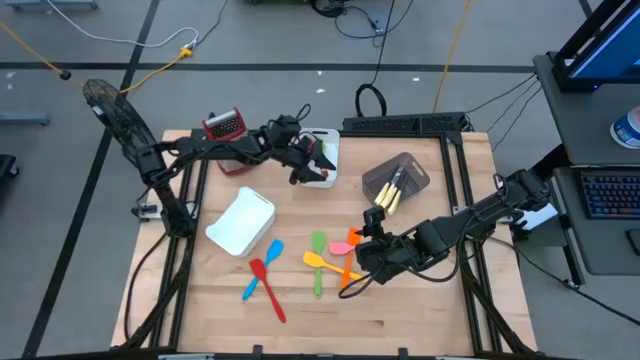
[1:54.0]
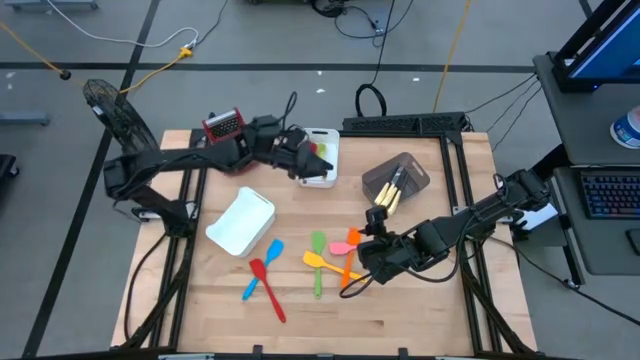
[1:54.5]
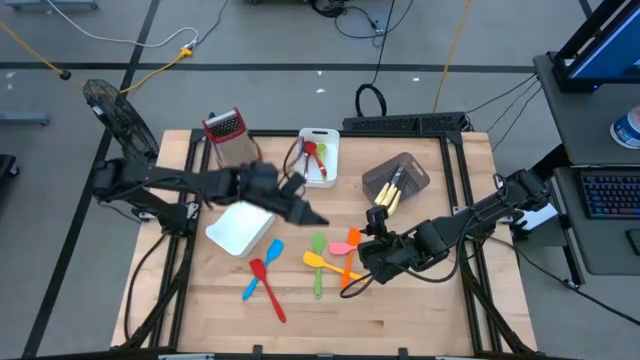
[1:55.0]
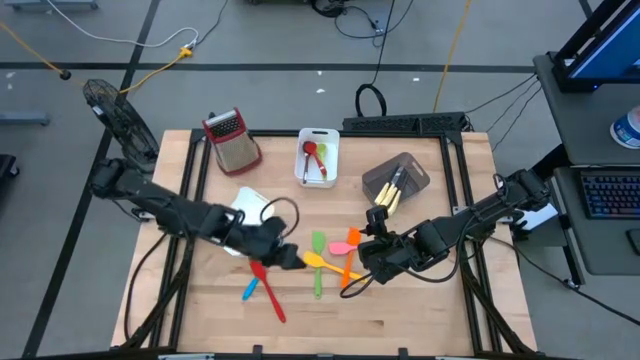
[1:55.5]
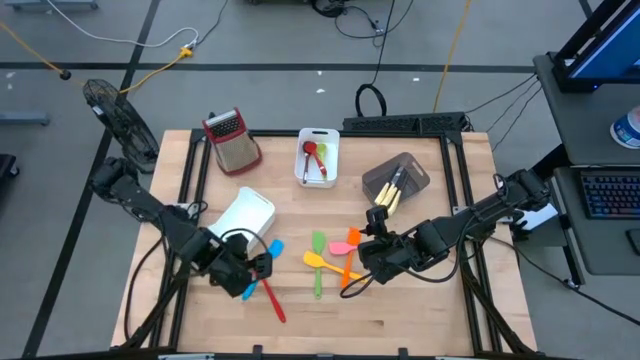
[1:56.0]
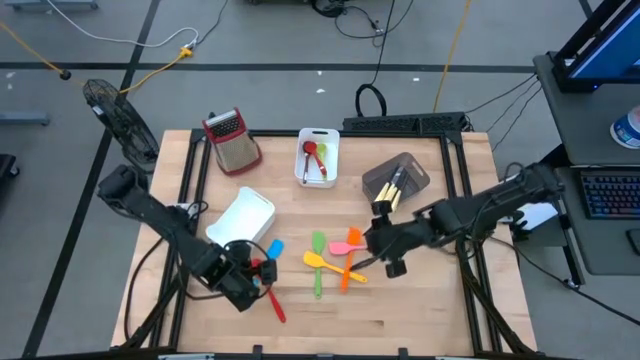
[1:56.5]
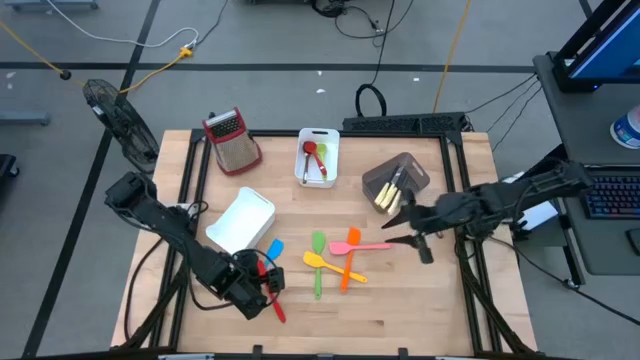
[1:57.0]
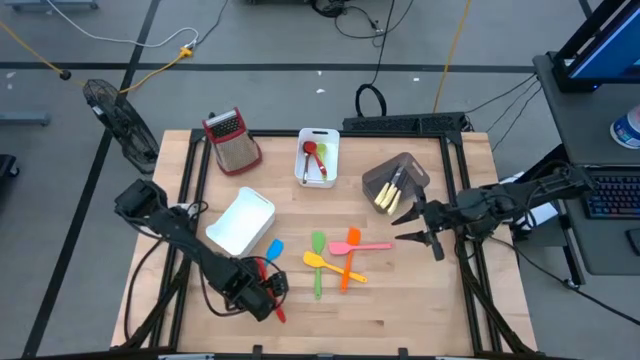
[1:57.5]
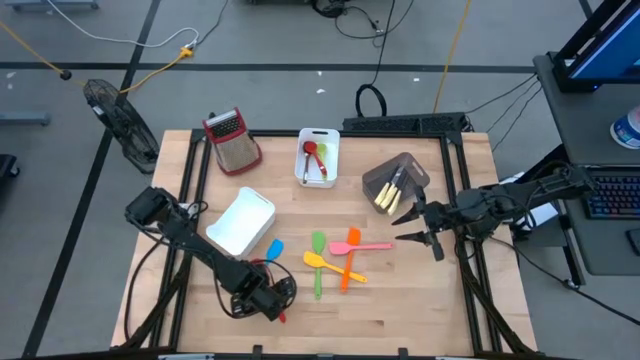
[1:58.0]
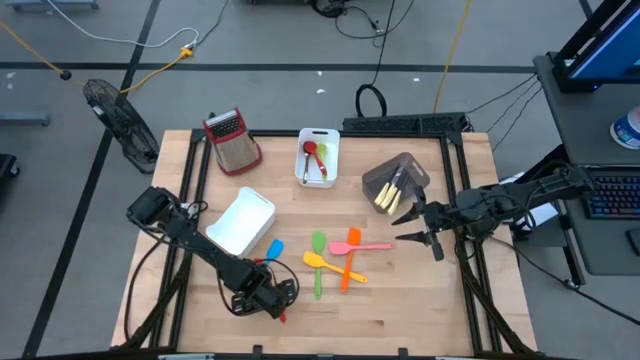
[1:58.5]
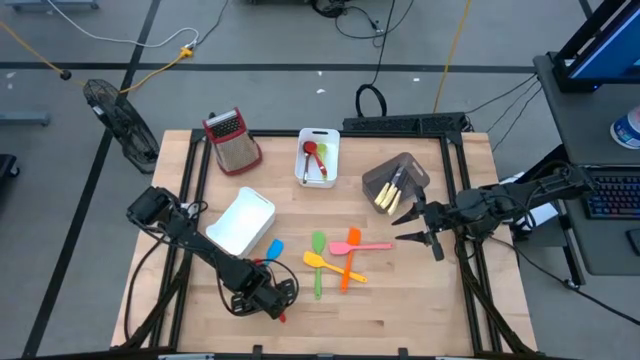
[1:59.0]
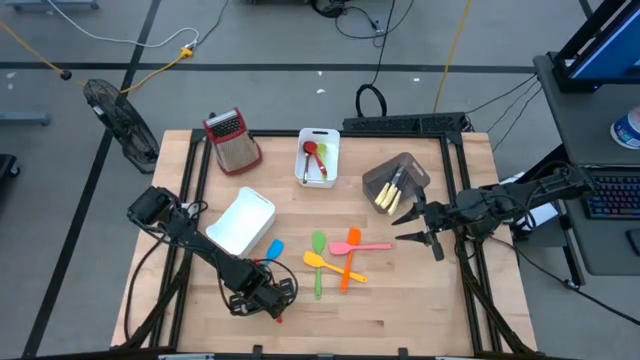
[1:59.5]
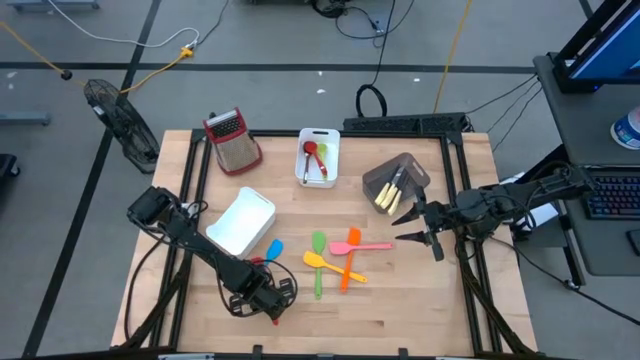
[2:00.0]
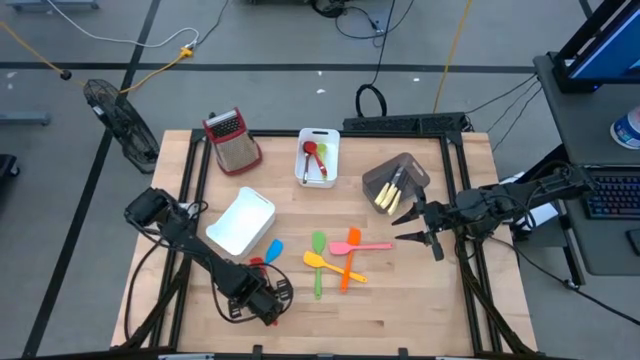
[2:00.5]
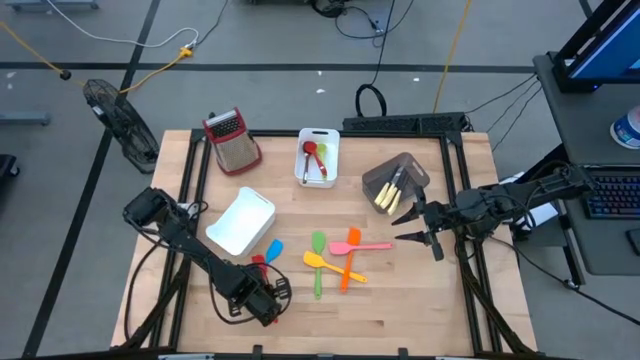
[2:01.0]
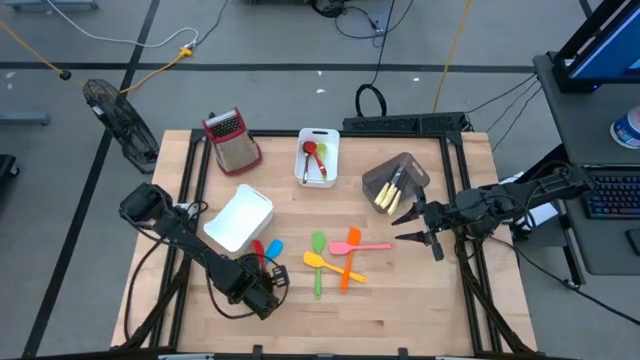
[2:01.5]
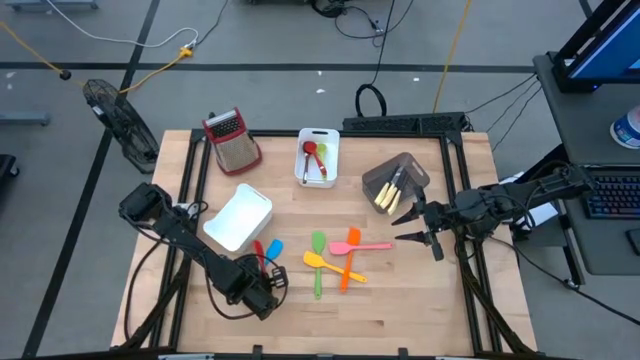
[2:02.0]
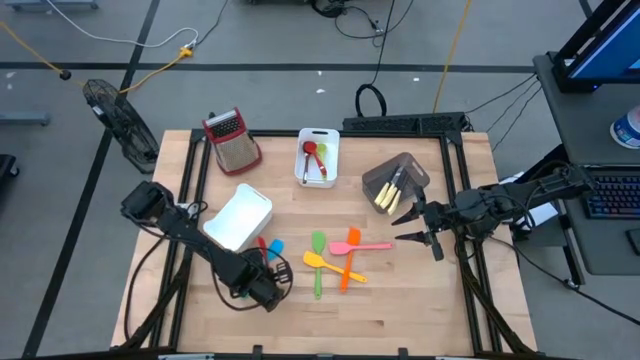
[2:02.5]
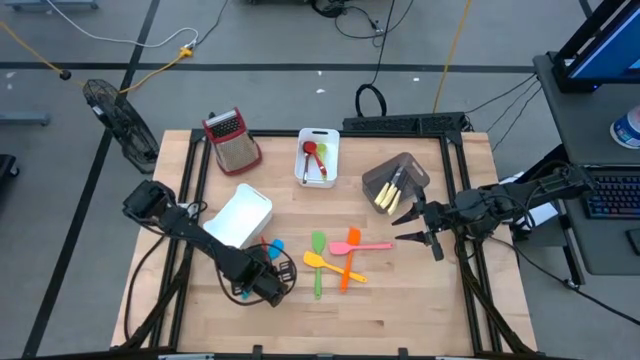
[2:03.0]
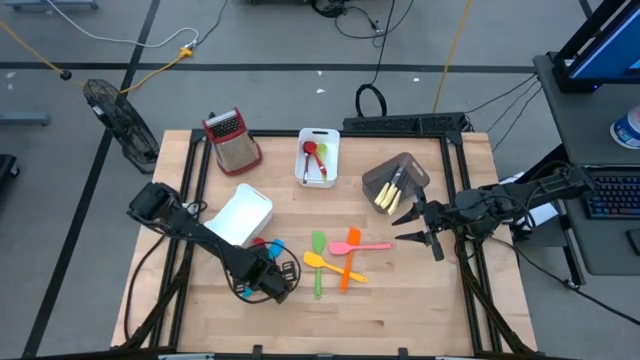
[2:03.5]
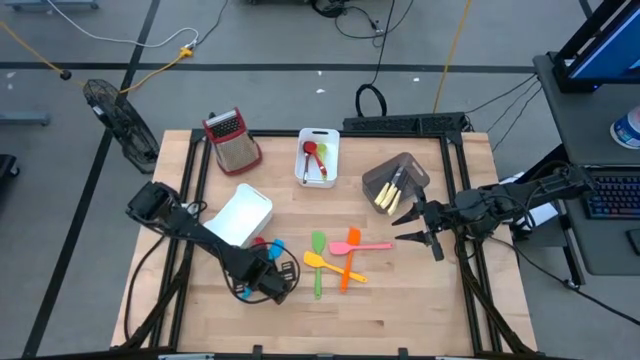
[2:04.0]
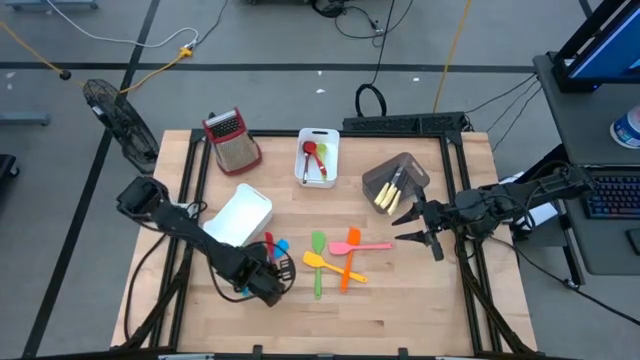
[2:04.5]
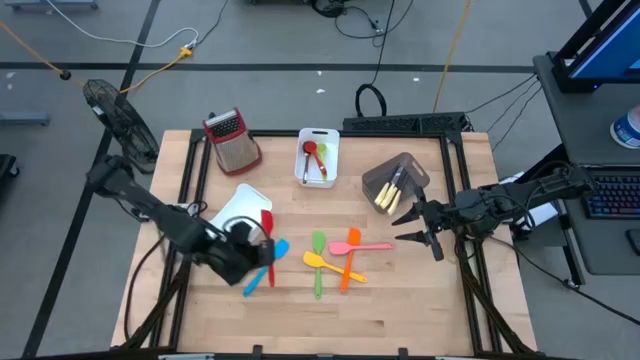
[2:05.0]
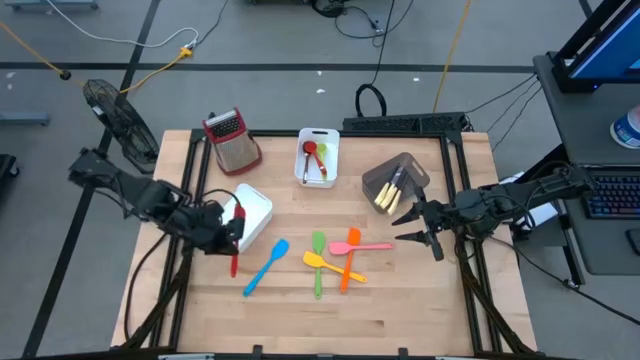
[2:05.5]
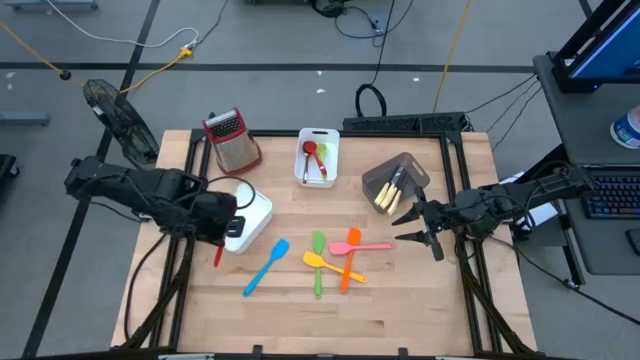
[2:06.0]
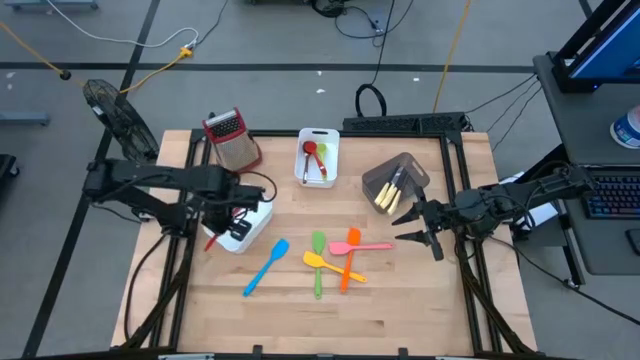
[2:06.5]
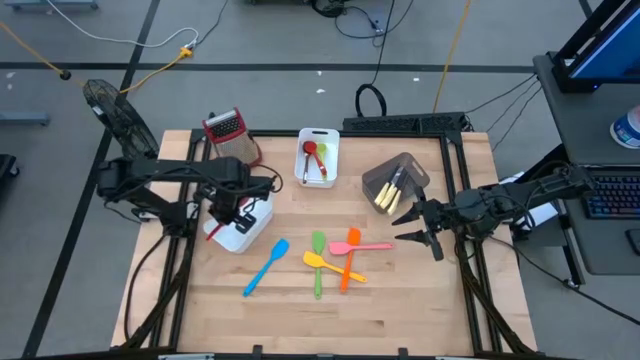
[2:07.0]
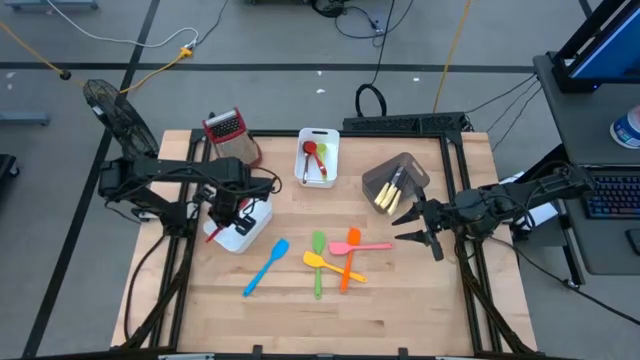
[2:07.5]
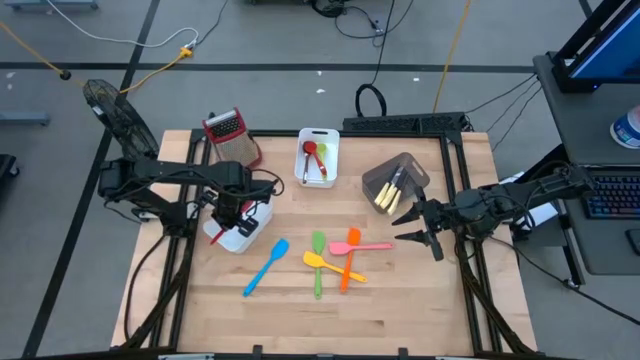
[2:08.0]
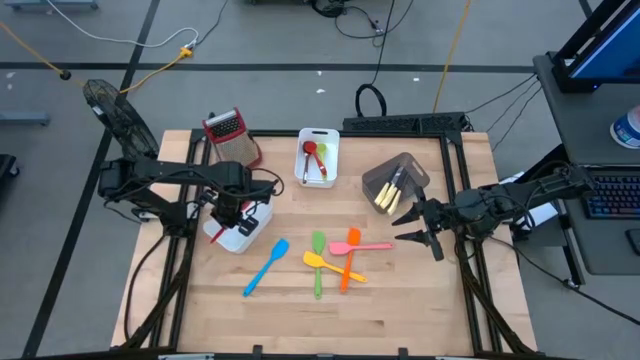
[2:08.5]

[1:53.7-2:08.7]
Task: Pick & Place Kitchen Items
Put the red spatula into the bottom white bin

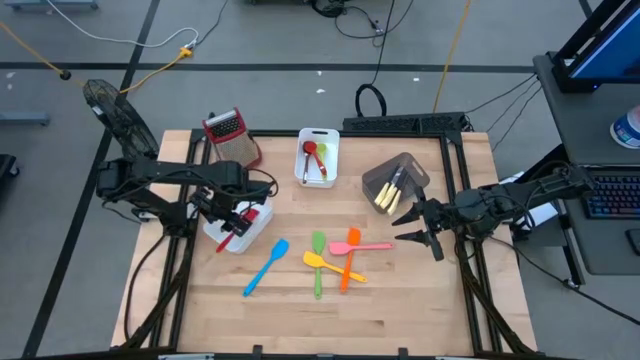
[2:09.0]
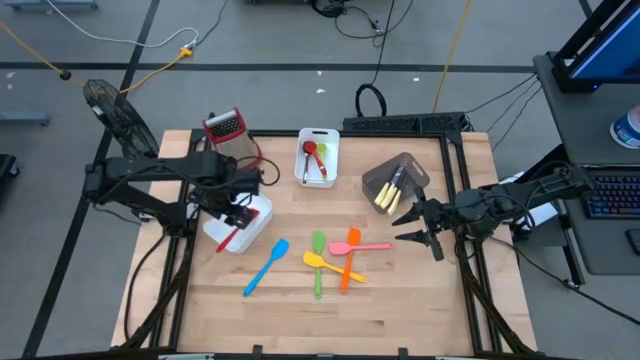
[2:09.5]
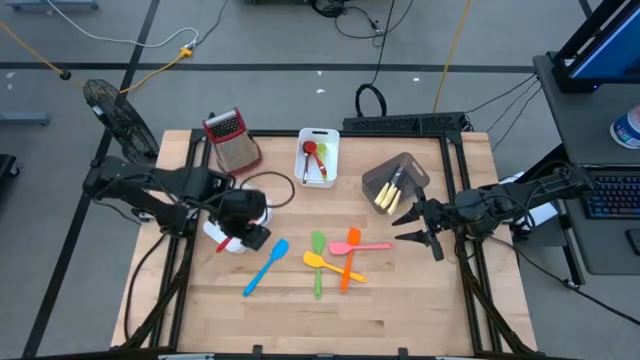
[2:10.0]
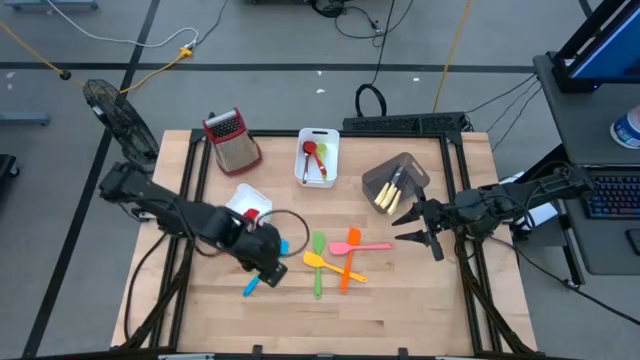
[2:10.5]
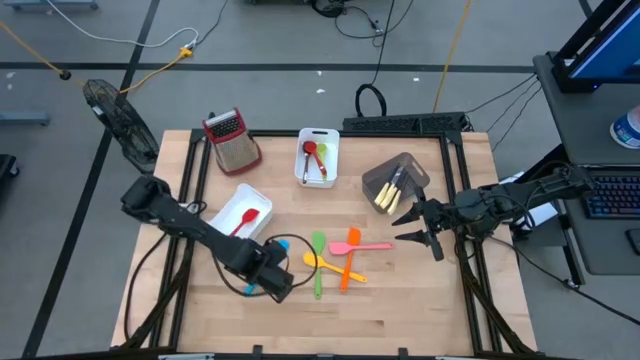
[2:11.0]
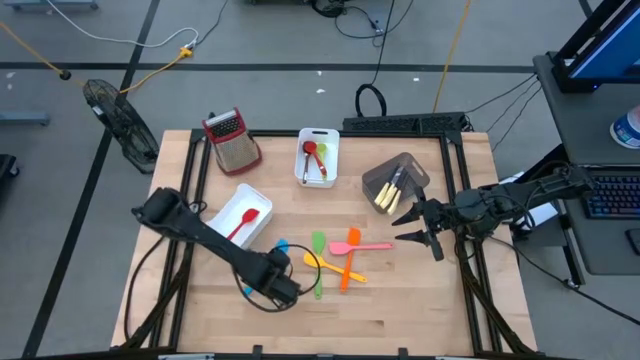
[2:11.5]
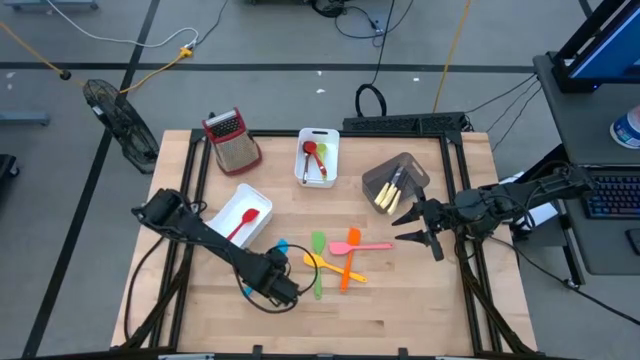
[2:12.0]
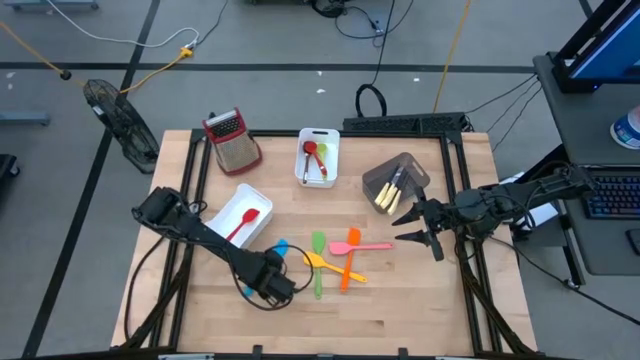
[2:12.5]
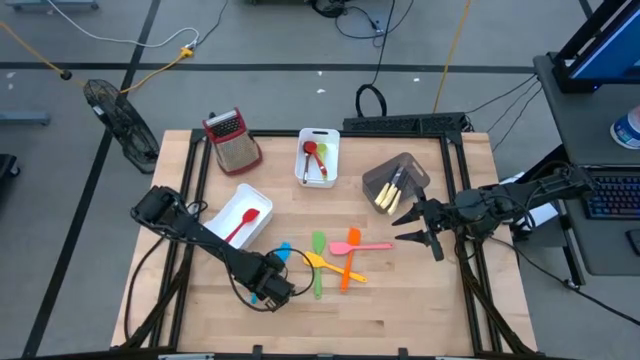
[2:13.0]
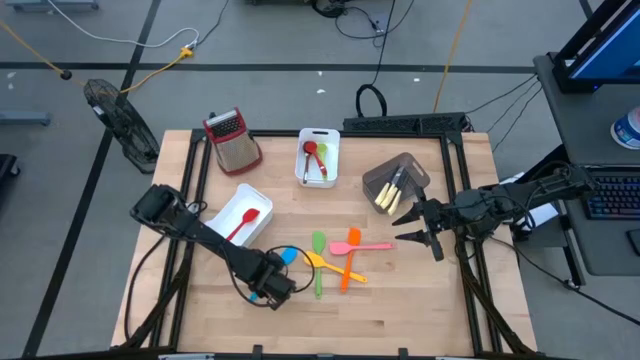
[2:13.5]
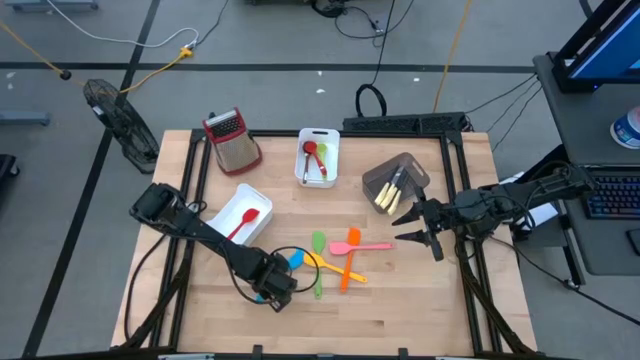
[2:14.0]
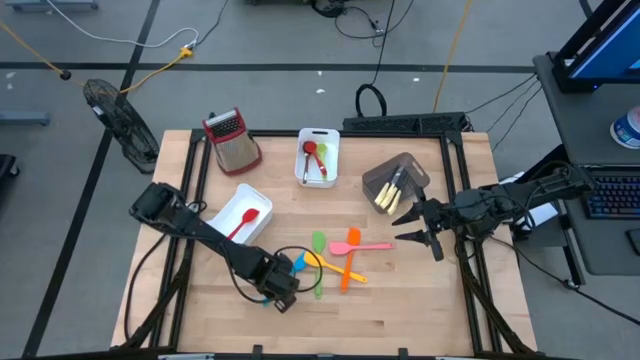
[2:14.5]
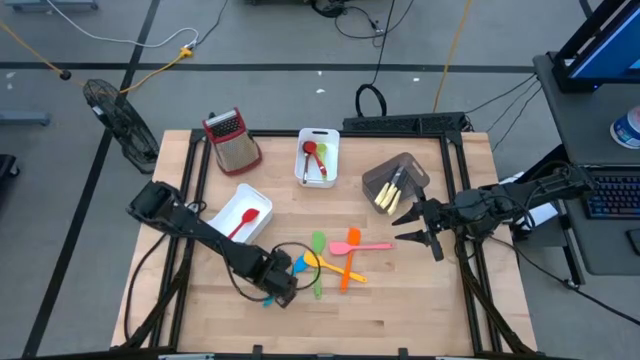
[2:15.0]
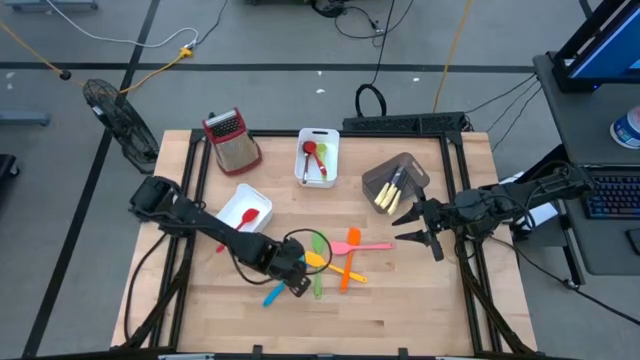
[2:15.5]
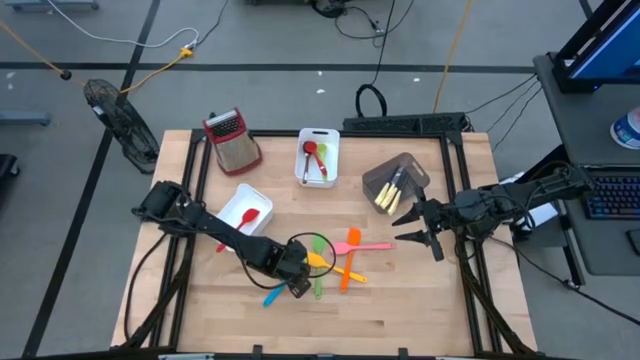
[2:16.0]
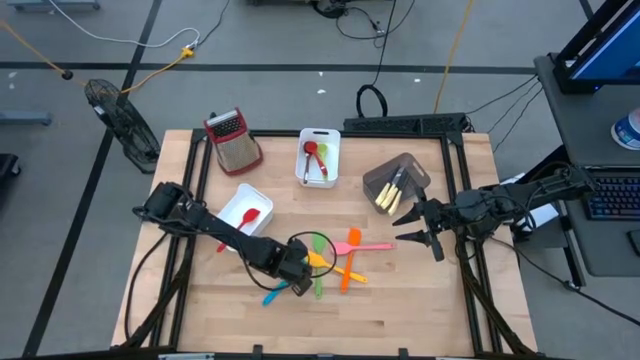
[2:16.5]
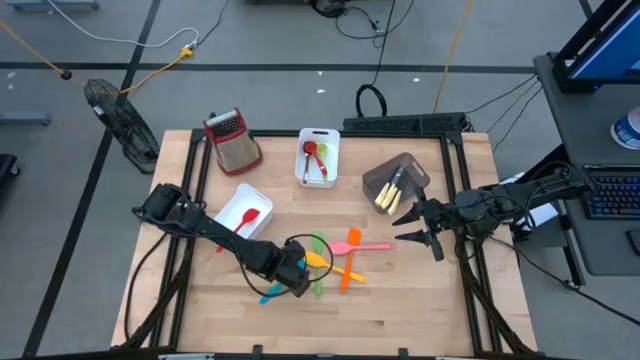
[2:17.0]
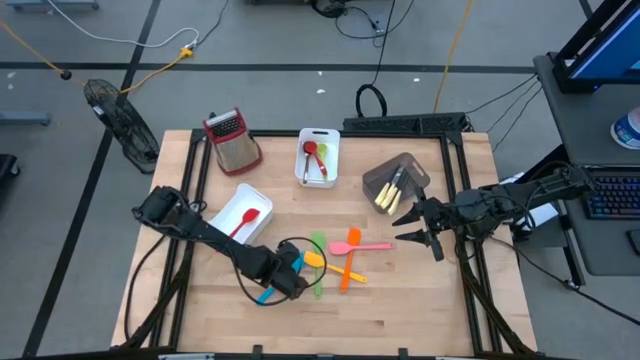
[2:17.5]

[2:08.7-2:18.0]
Put the blue spatula into the bottom white bin
